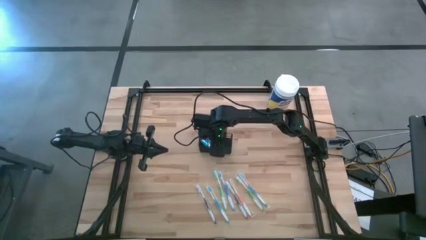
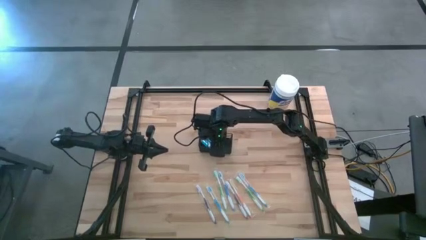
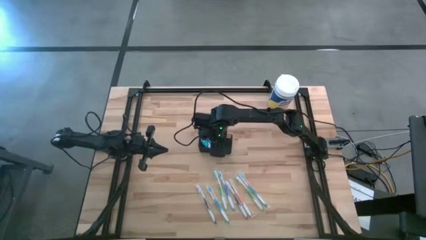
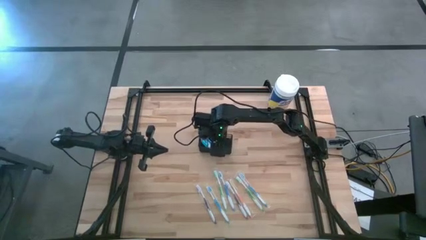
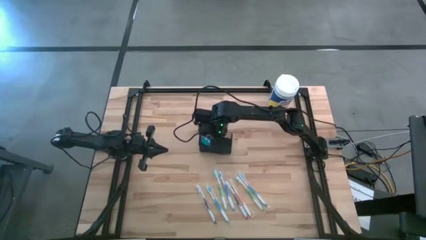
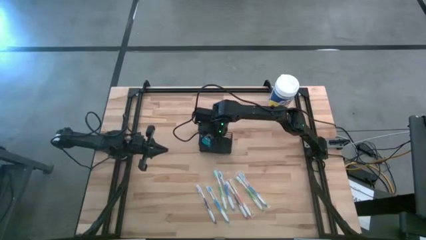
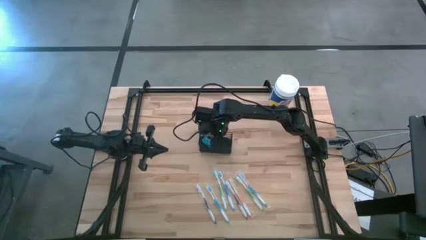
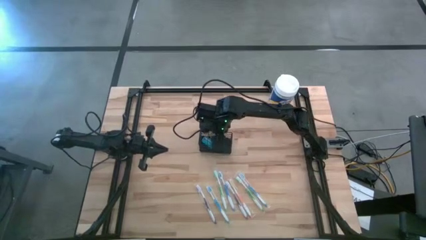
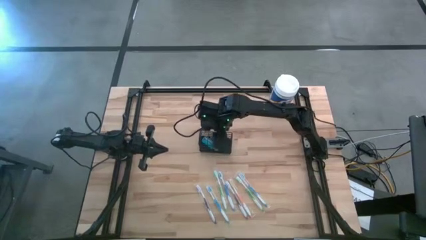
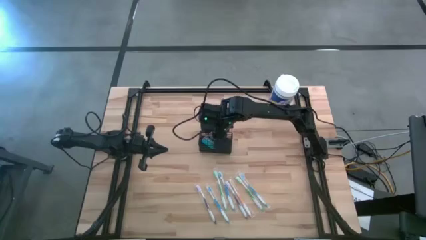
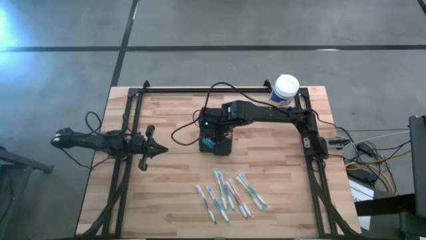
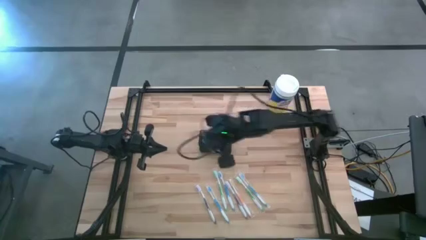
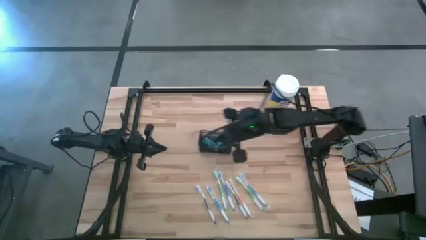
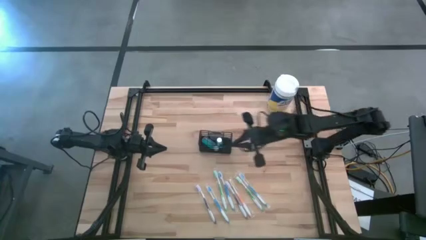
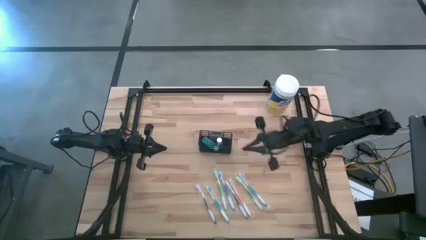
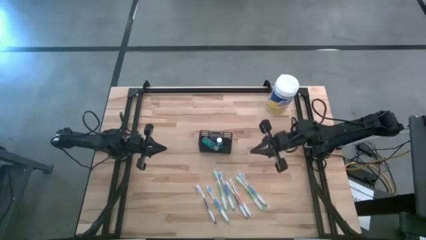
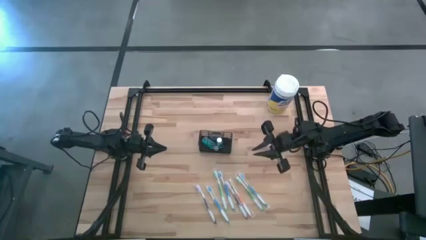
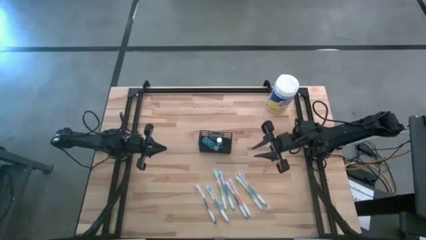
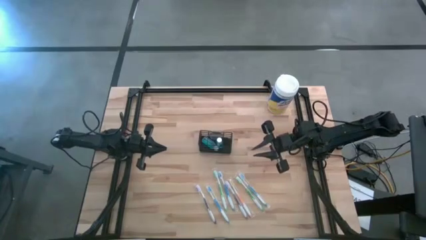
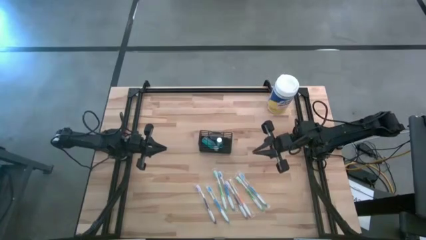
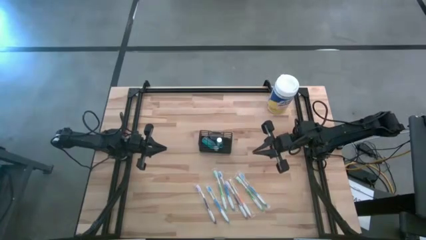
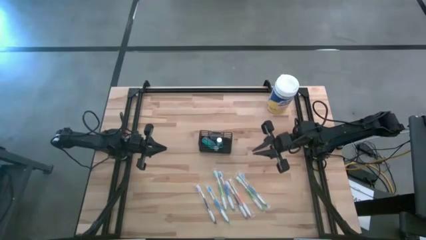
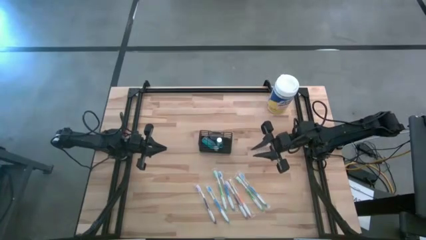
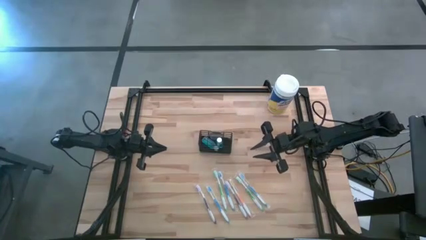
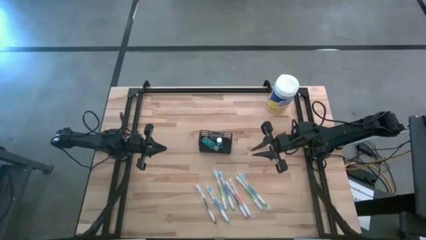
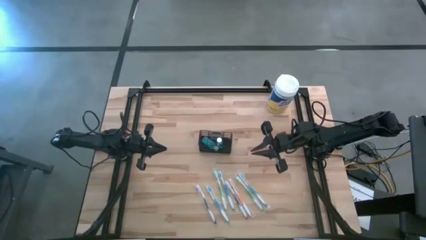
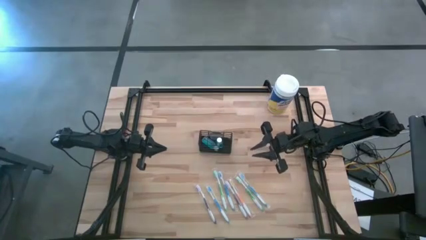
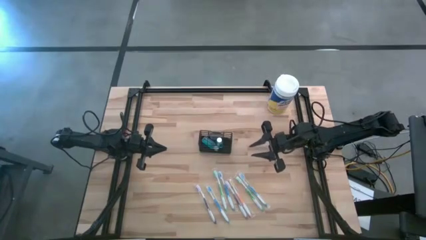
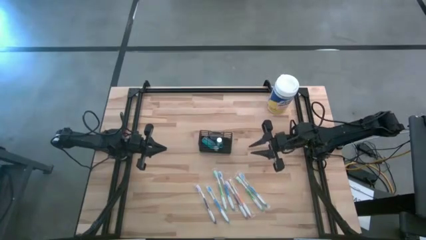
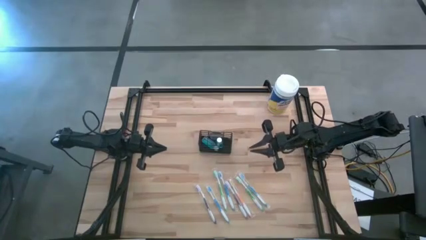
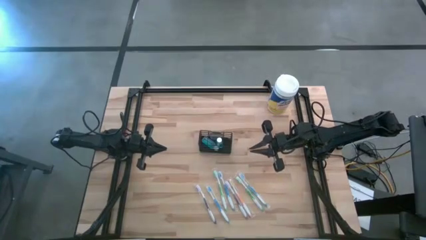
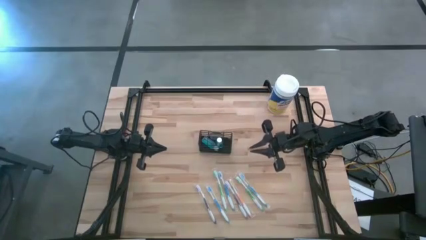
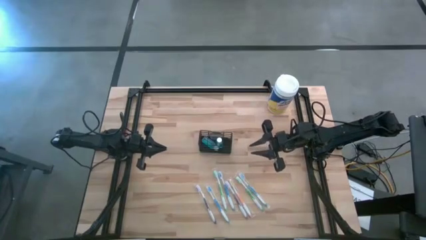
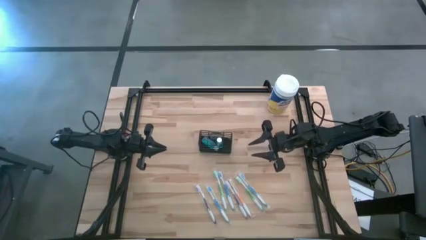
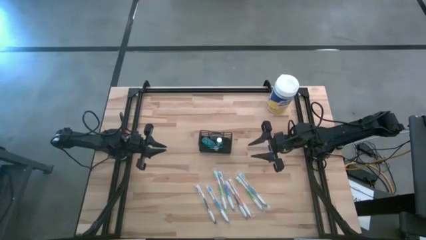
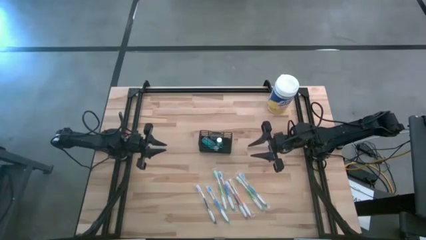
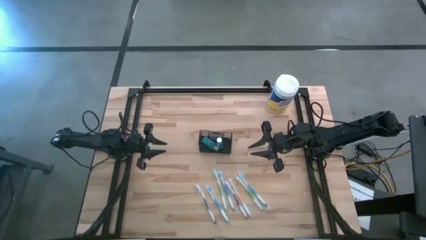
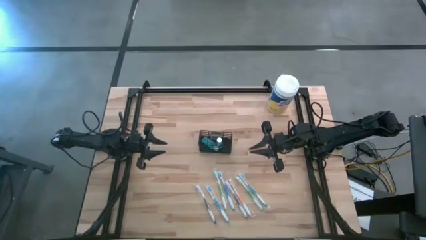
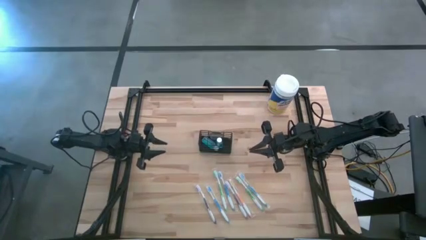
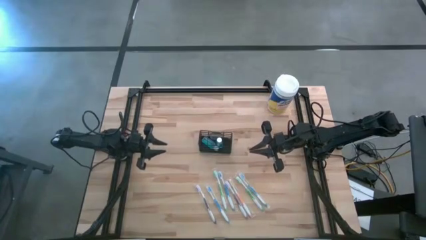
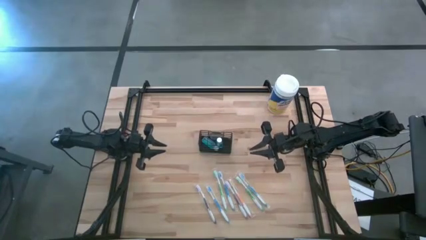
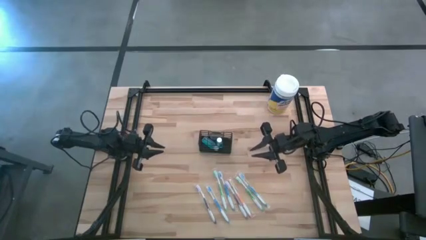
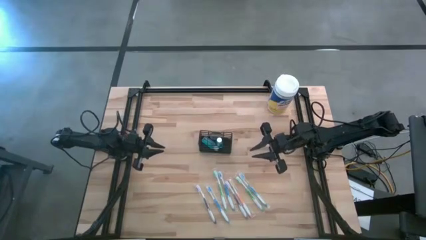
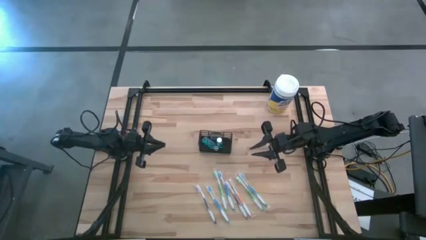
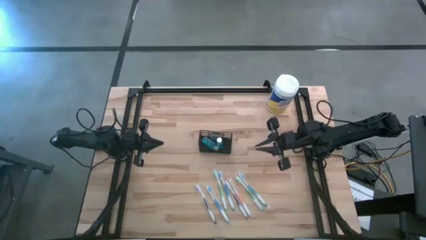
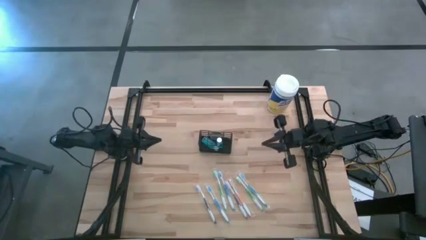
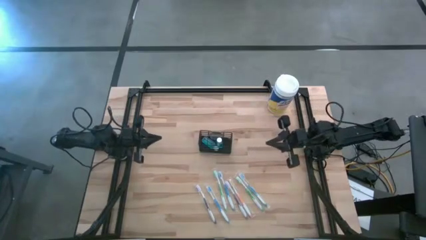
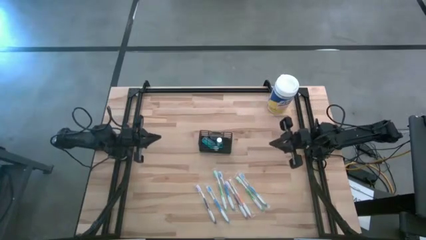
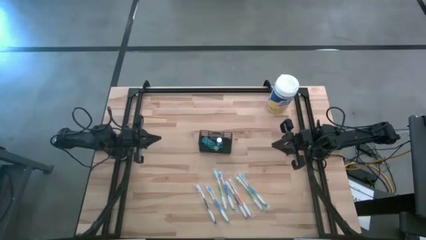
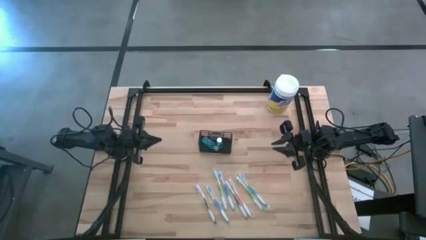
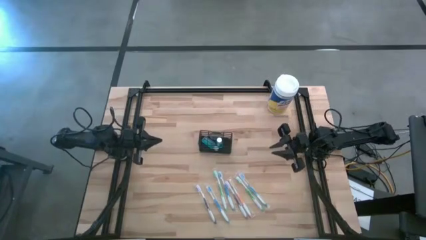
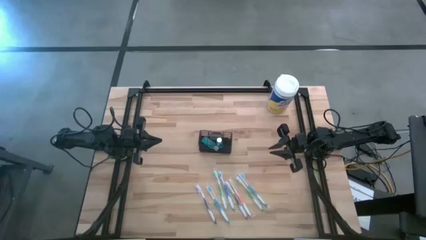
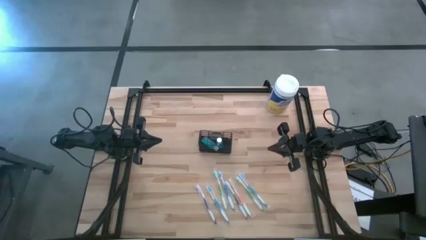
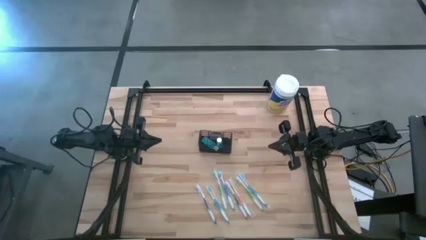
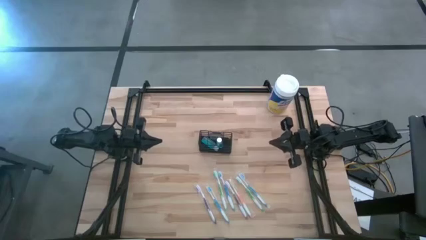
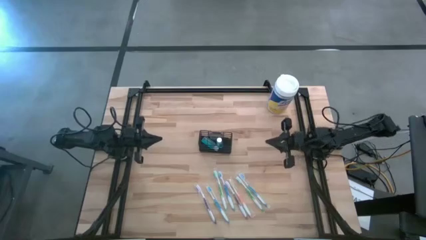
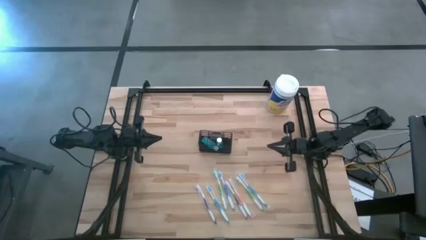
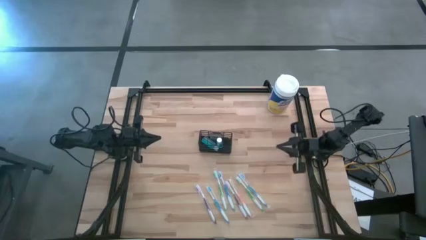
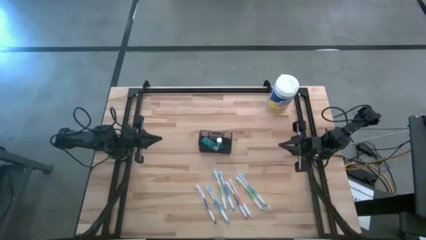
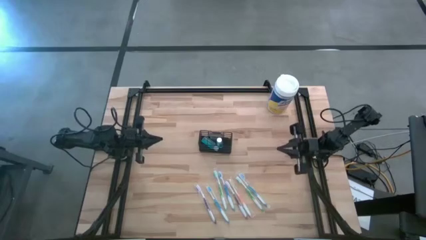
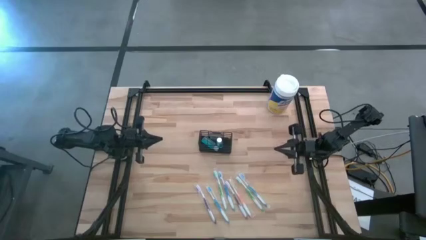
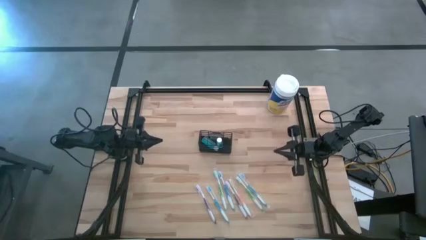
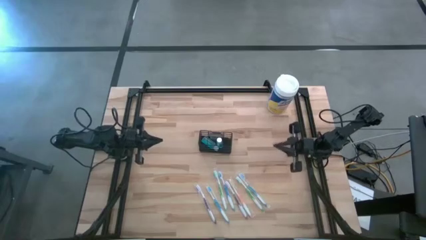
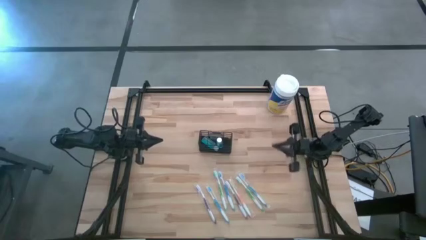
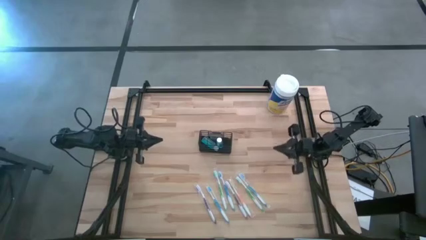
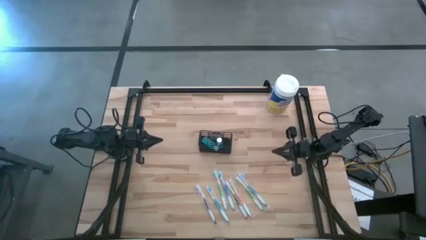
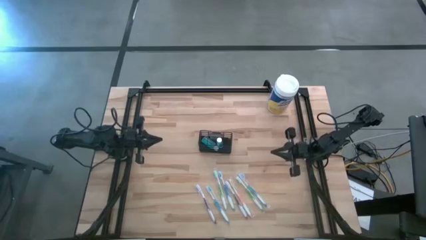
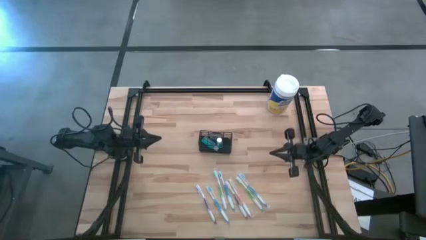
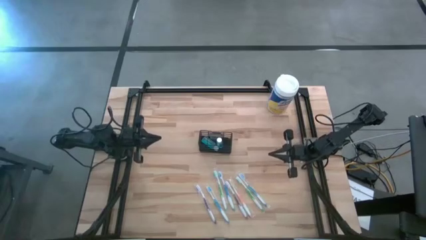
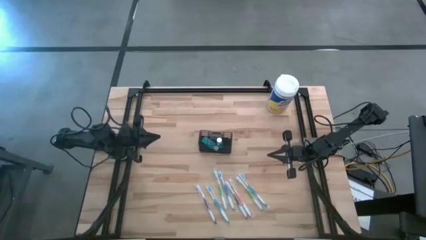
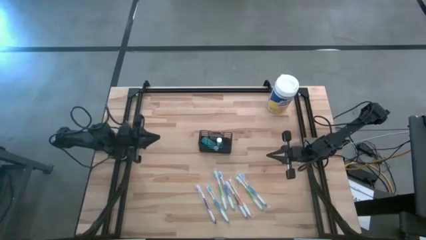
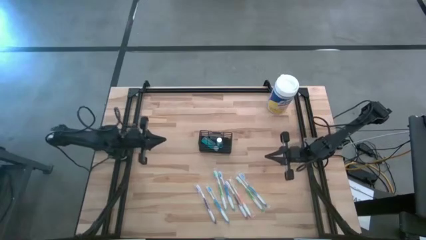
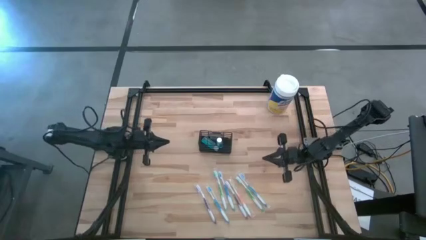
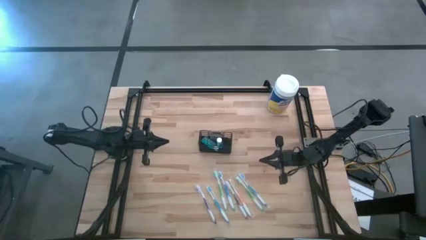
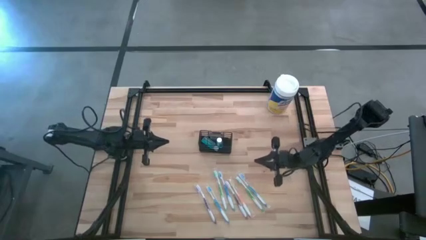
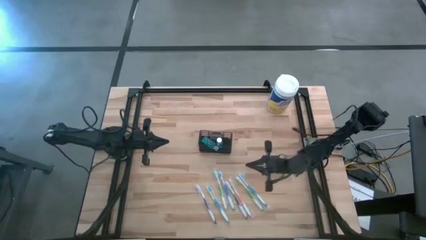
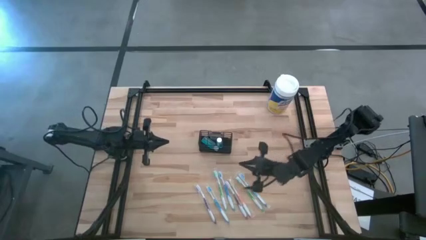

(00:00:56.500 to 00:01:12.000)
Task: Pick & Place toothbrushing station
Put the right blue toothbrush into the black wire organizer

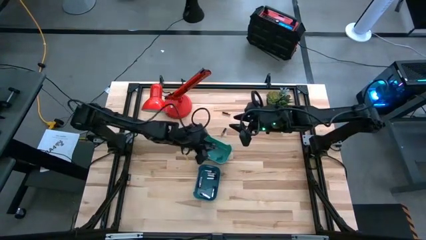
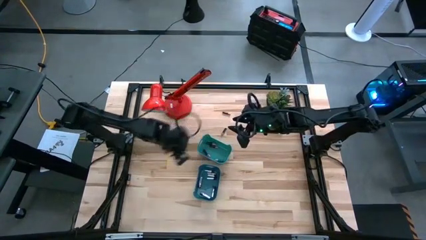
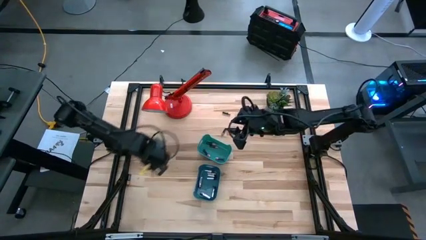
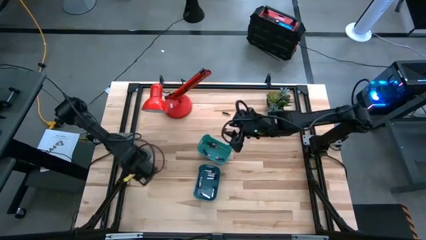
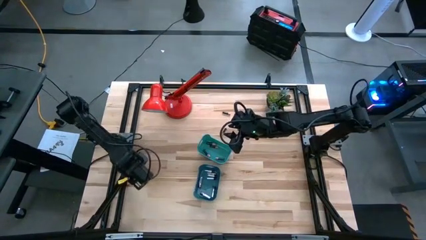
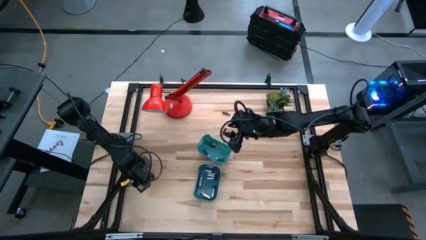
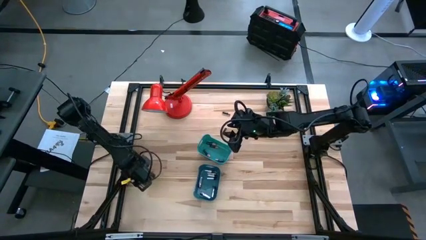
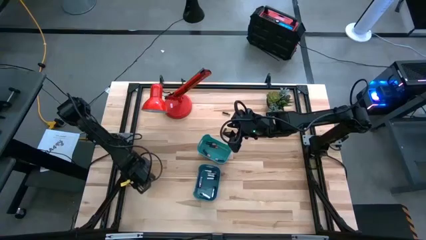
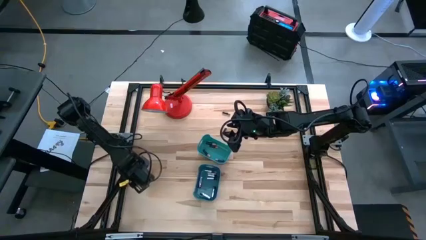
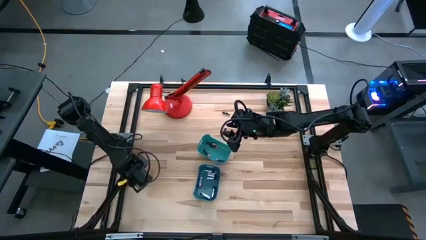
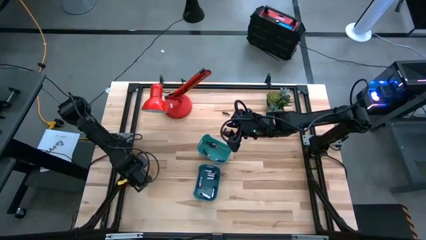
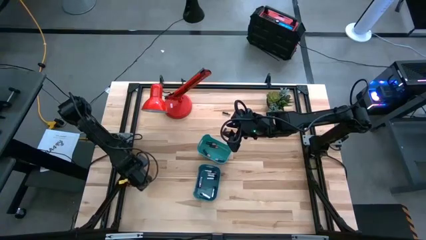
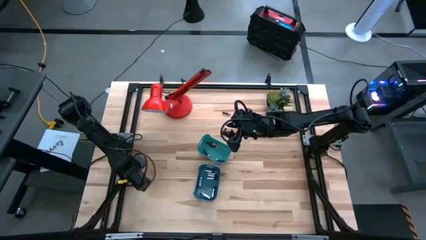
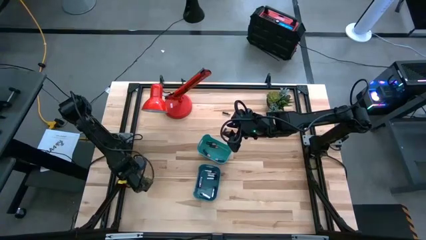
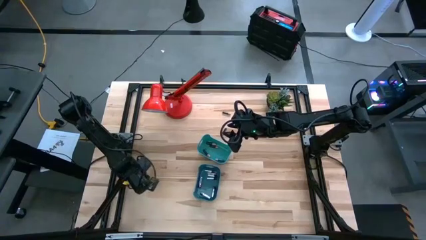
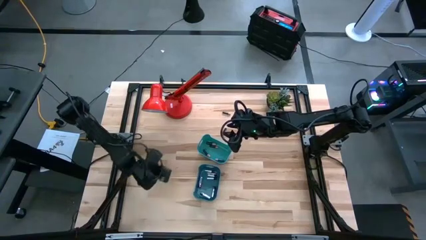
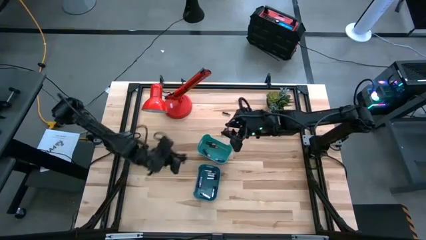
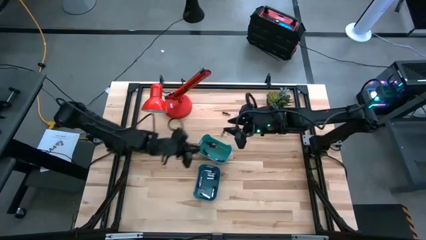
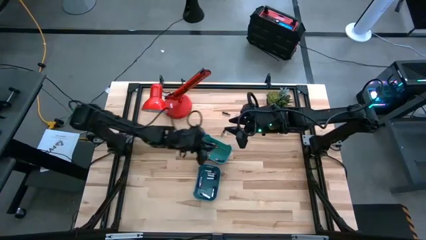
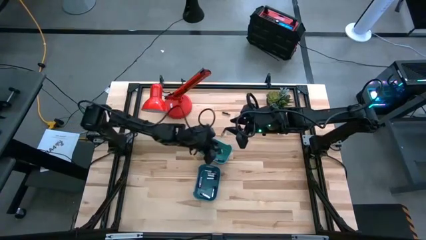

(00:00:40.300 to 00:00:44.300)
Task: Sort batteries
Put the black battery into the light blue bin
